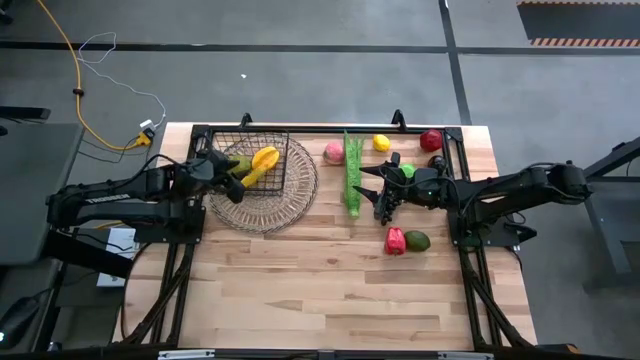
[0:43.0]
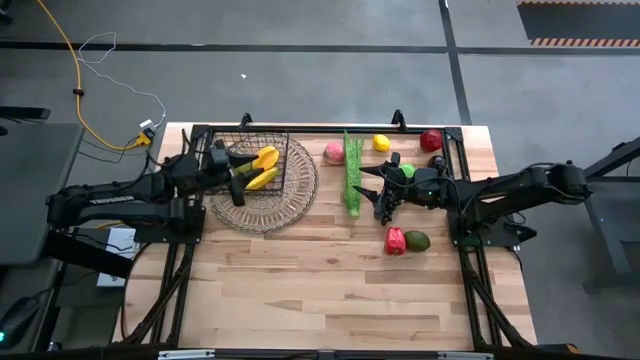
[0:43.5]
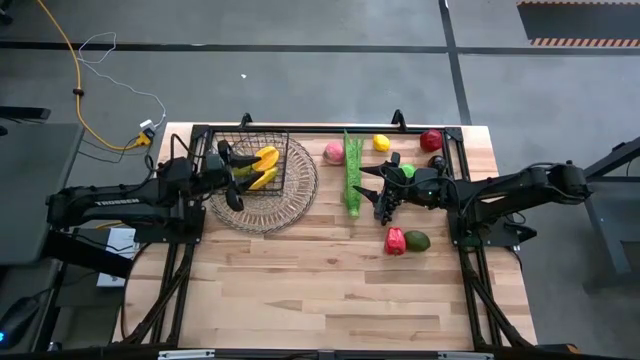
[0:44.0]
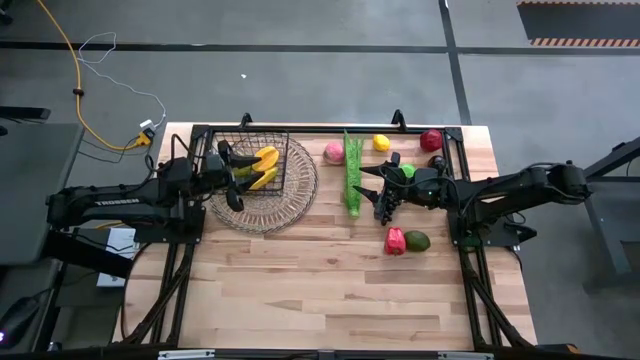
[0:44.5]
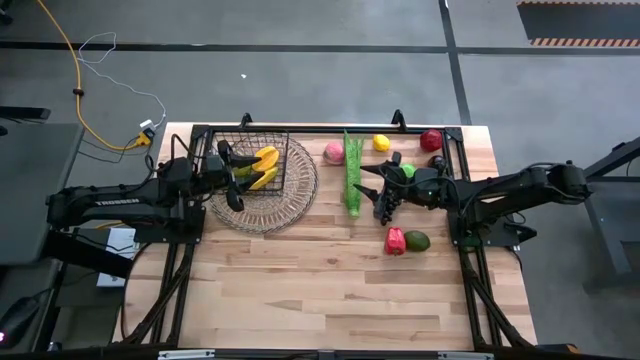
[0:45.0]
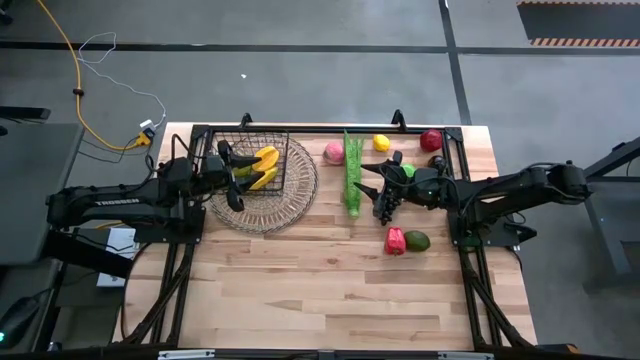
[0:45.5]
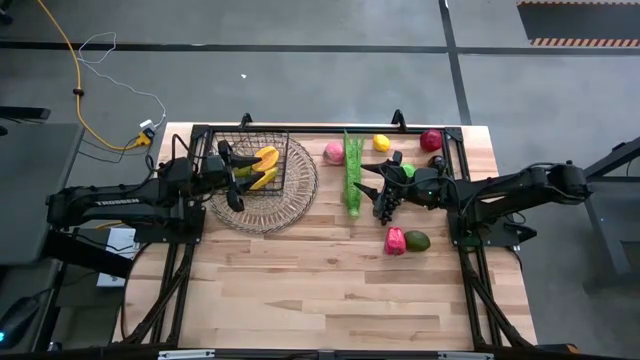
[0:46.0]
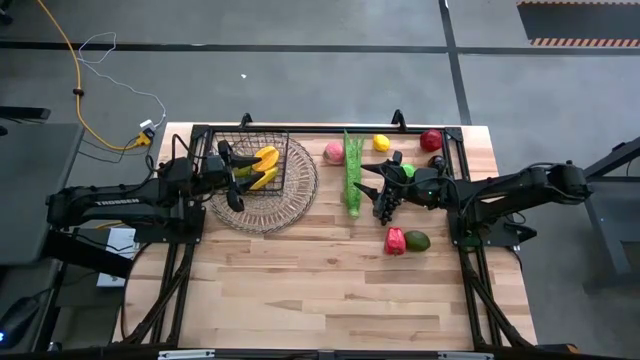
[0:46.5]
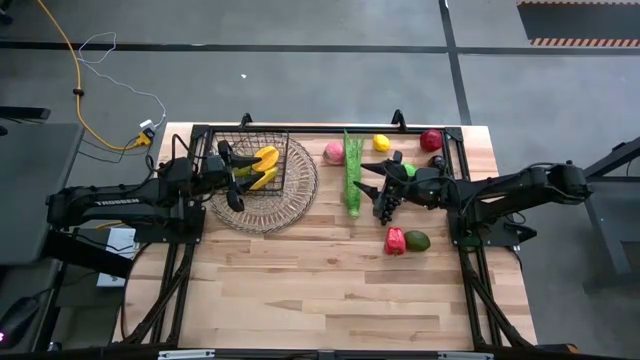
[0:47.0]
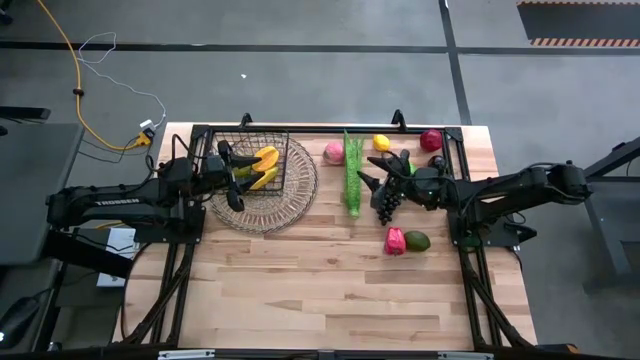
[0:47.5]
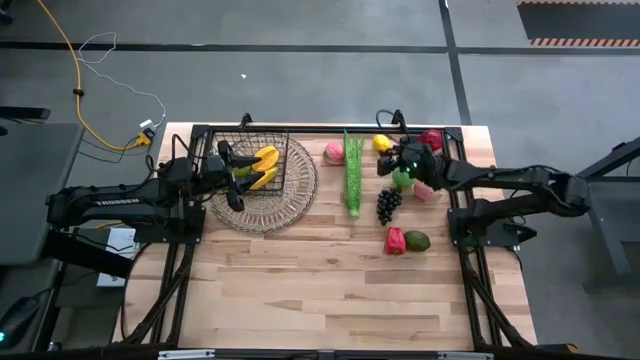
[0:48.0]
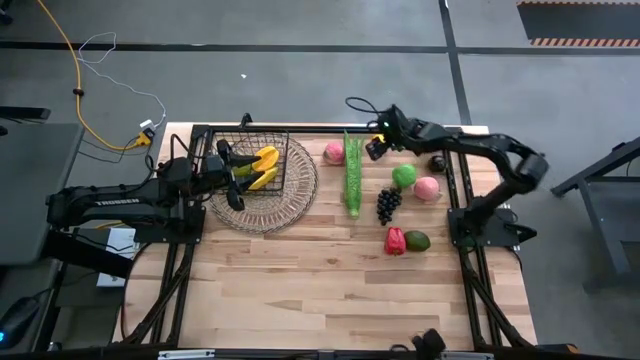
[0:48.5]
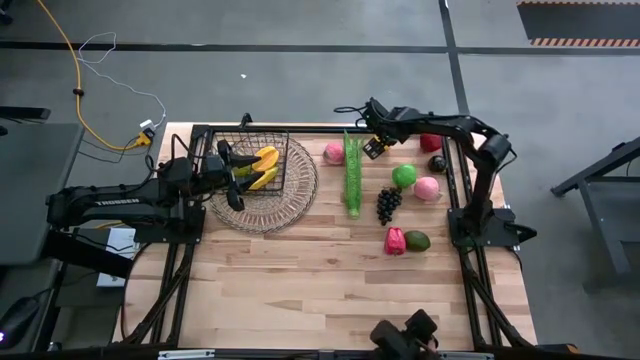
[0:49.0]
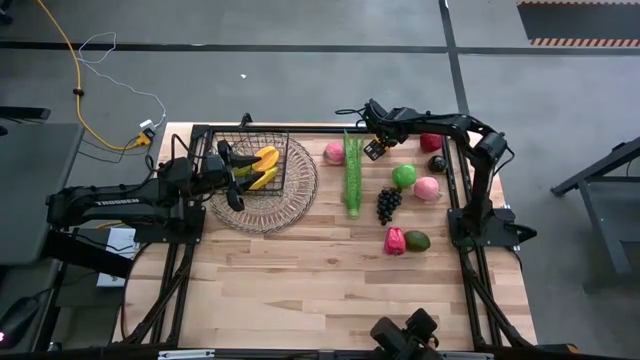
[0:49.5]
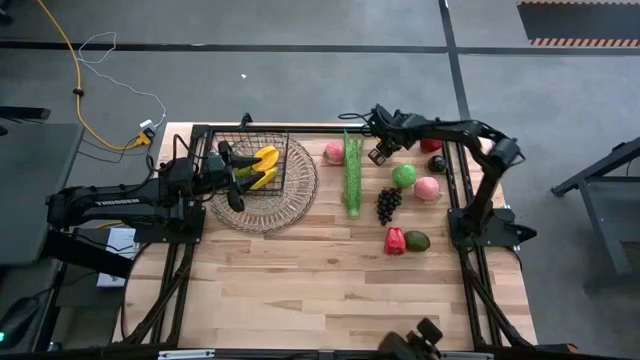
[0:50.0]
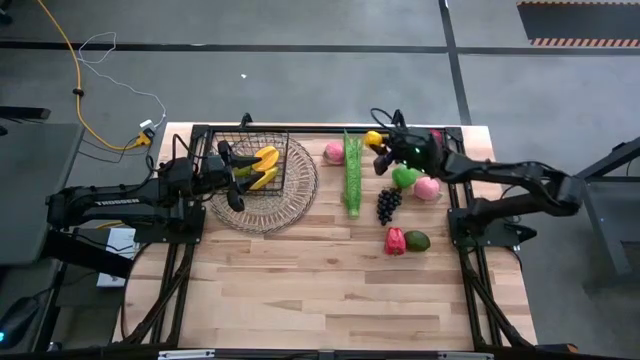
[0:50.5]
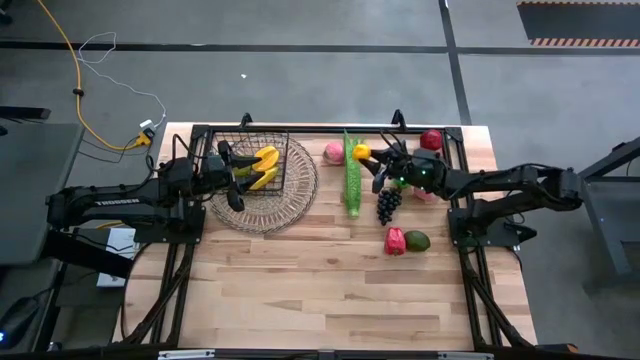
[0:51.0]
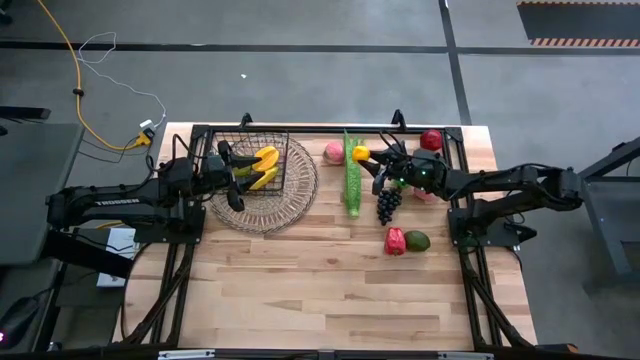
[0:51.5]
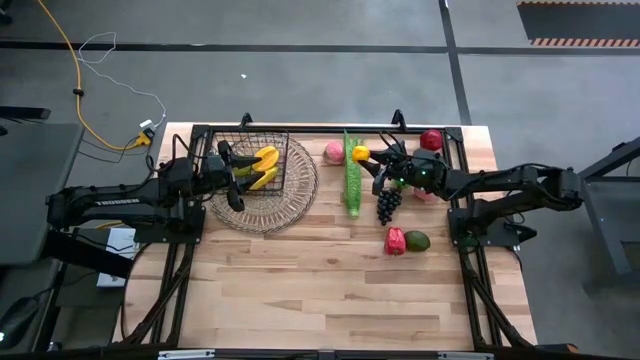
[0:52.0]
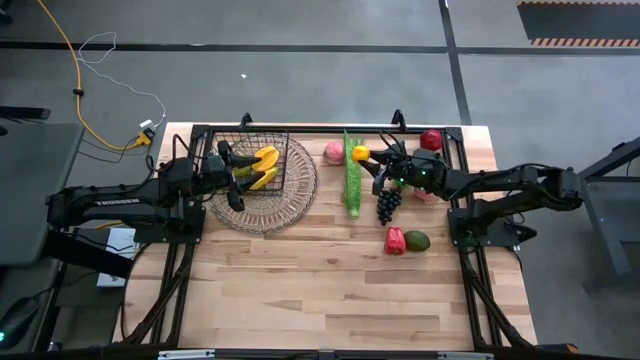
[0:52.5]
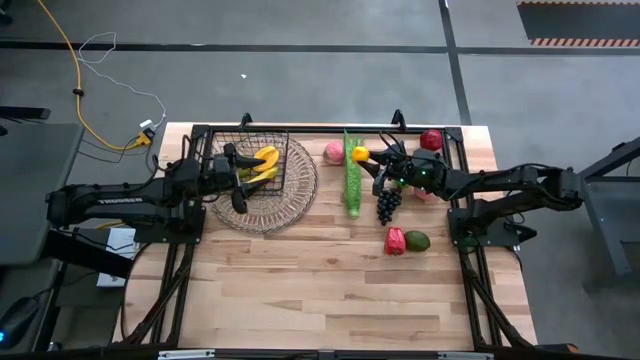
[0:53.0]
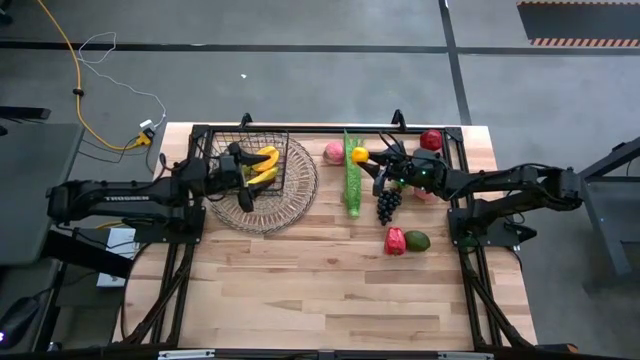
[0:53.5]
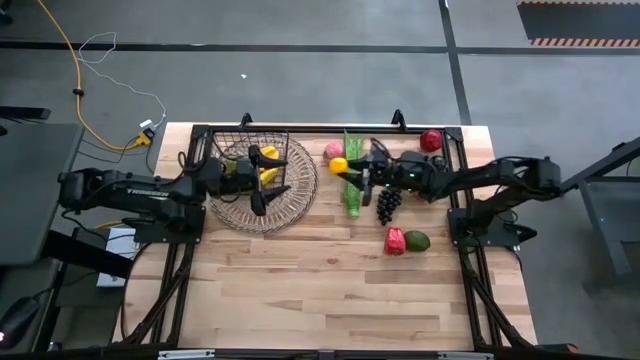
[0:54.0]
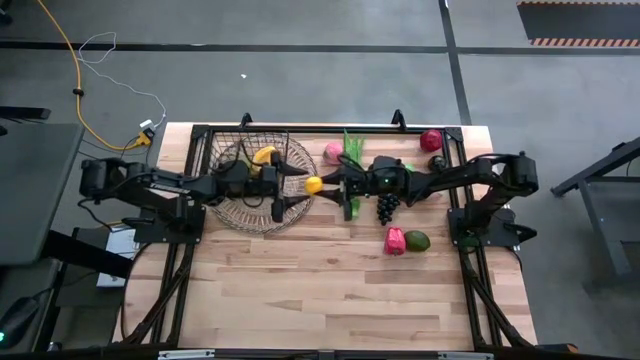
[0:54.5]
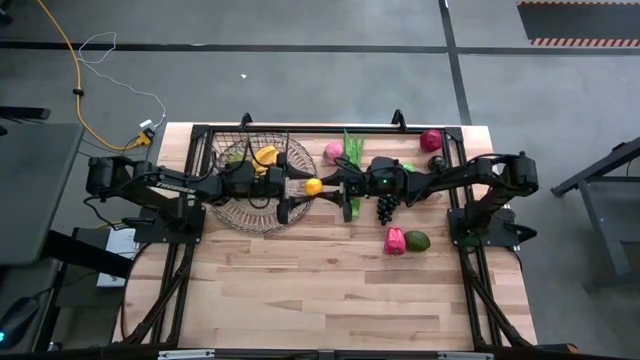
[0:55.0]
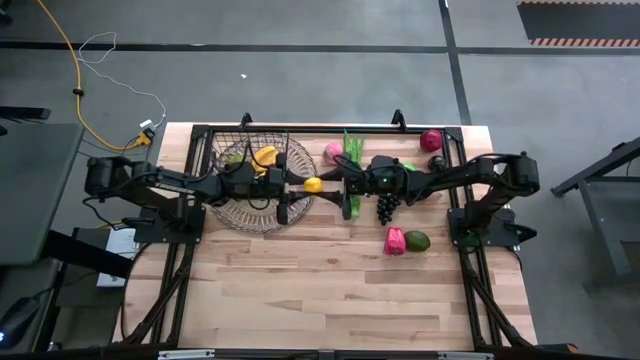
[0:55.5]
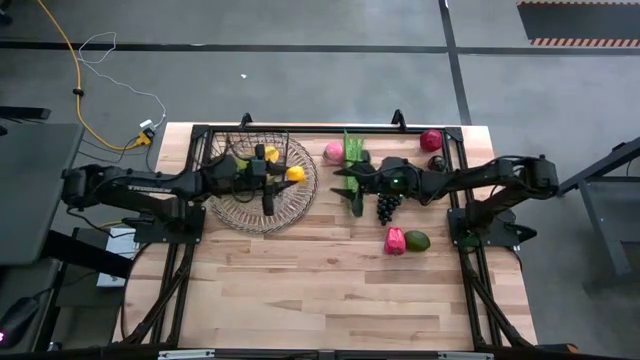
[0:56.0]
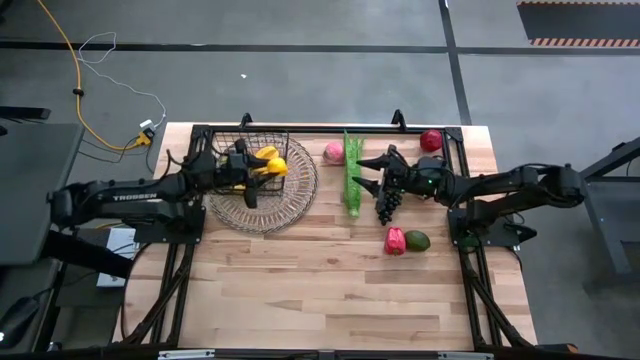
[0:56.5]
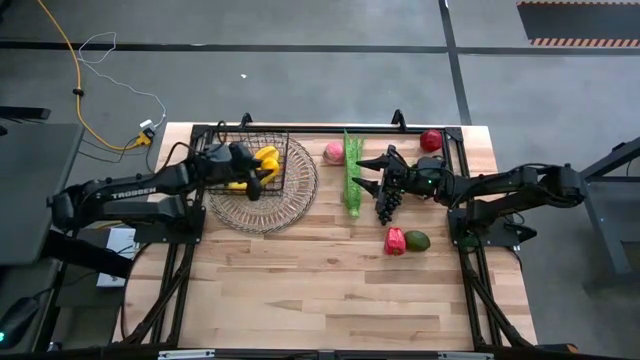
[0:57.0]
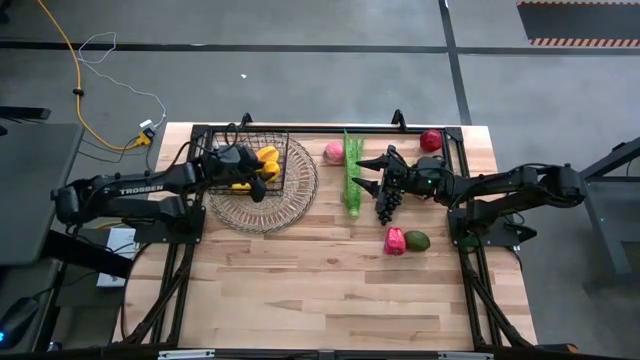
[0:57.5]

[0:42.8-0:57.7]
Task: Build produce basket
Put the yellow lemon into the black wire basket

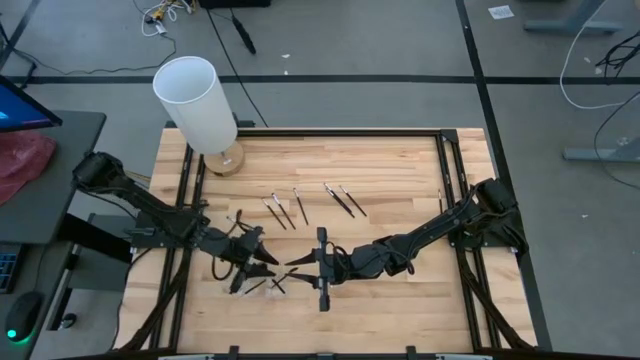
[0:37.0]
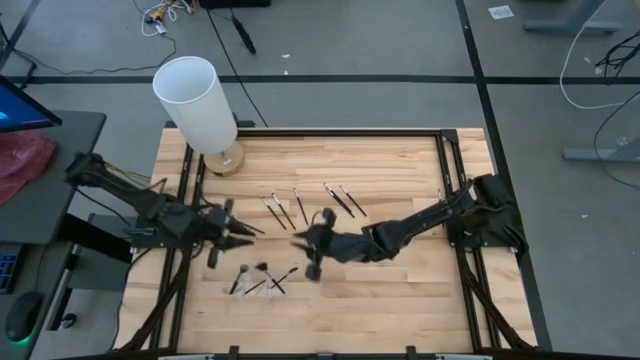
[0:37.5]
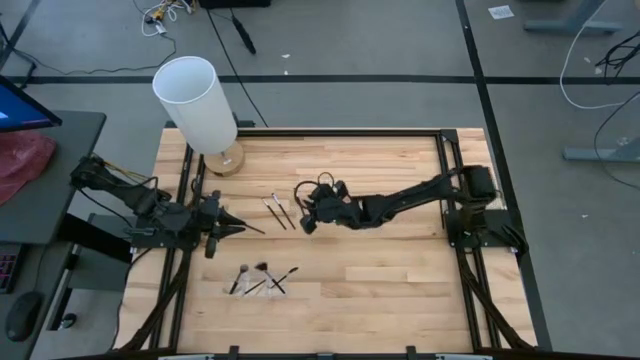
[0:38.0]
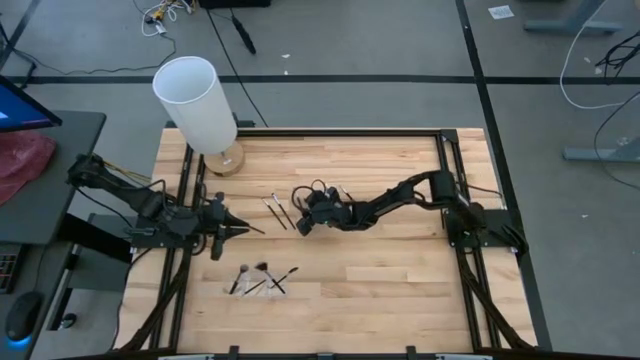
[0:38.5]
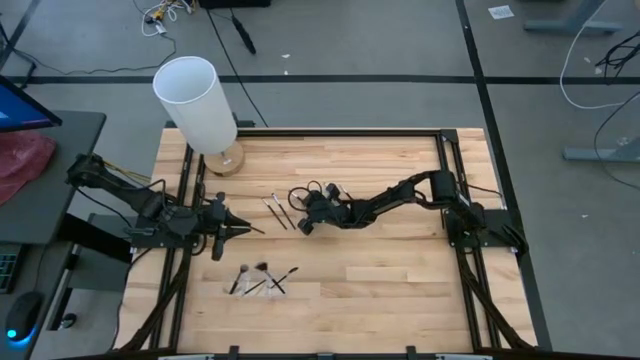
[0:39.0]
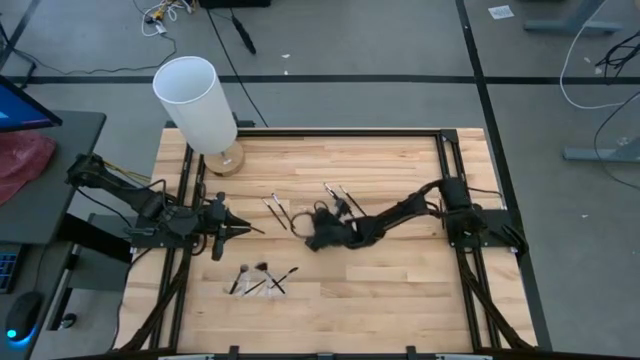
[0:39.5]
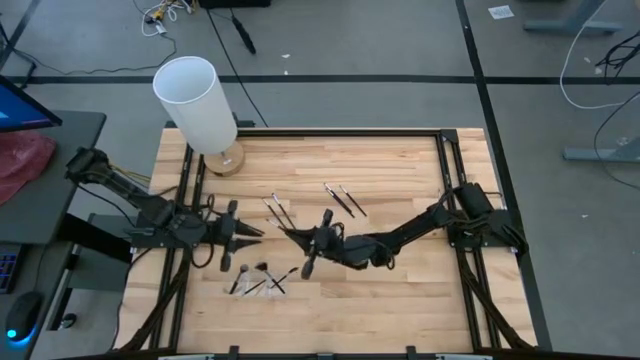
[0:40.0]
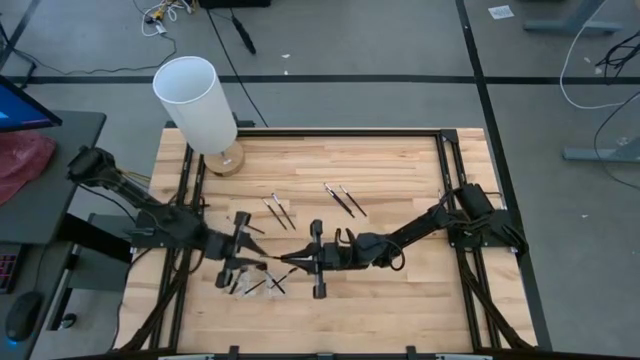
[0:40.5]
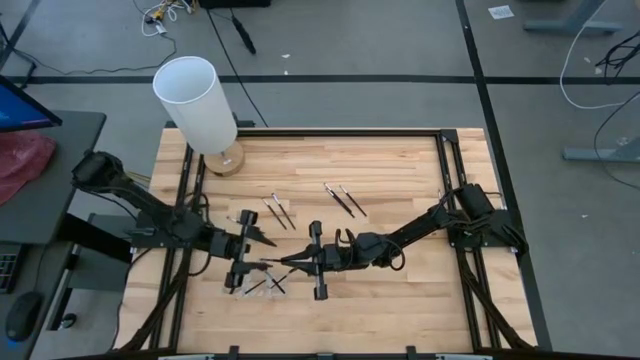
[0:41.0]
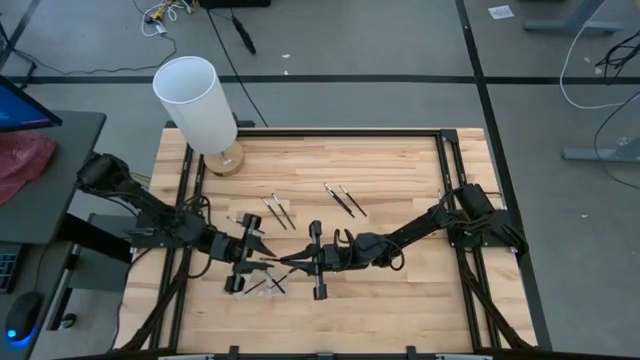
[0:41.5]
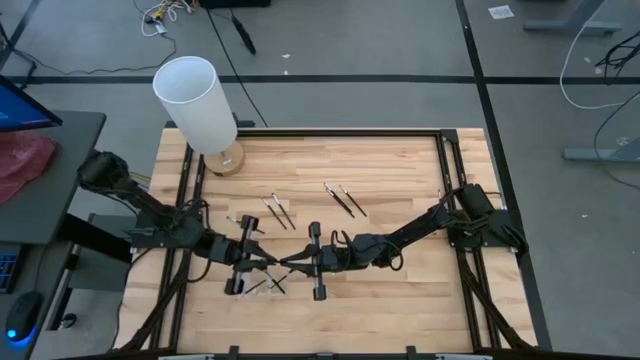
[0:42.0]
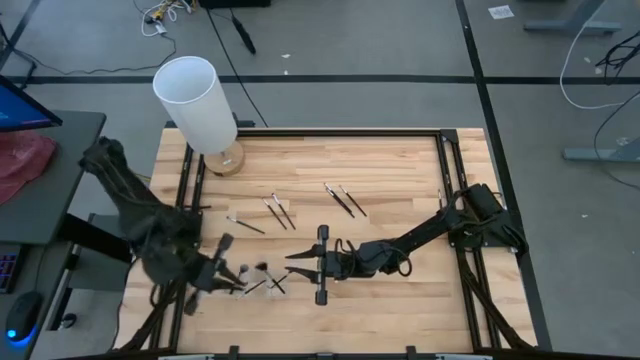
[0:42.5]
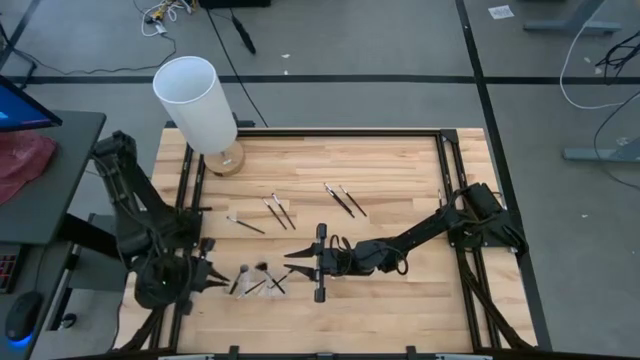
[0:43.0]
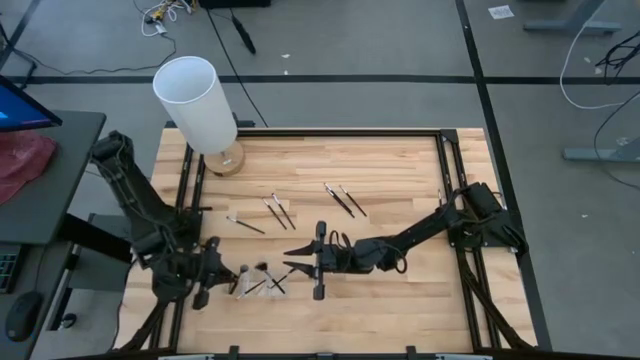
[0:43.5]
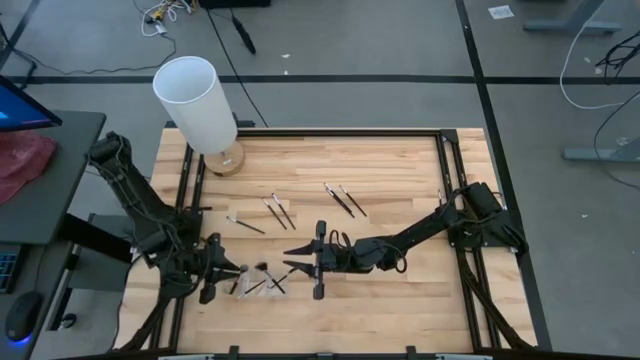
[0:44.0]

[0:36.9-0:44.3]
Task: Put items in baskets/containers
Put the eyeshadow brush into the transparent organizer
